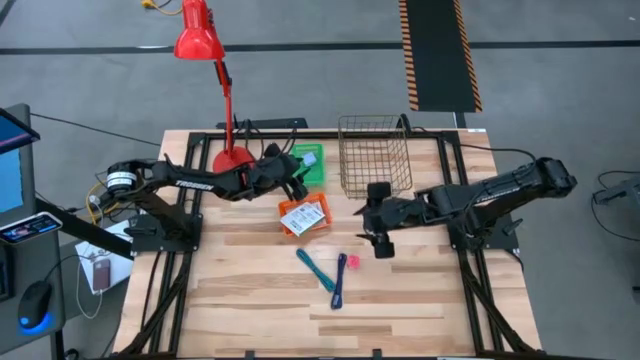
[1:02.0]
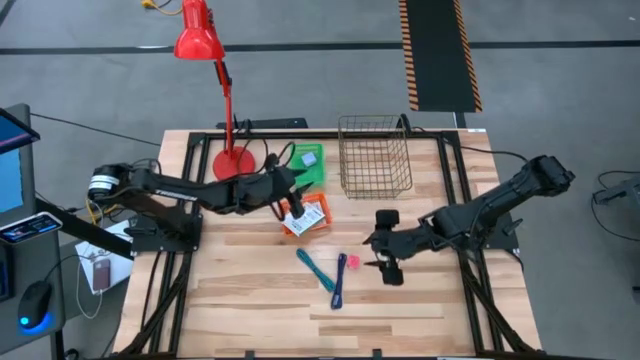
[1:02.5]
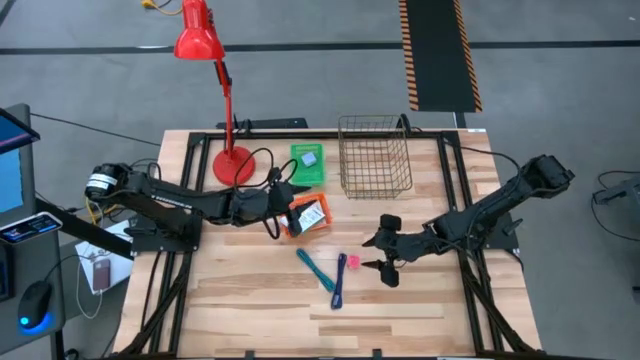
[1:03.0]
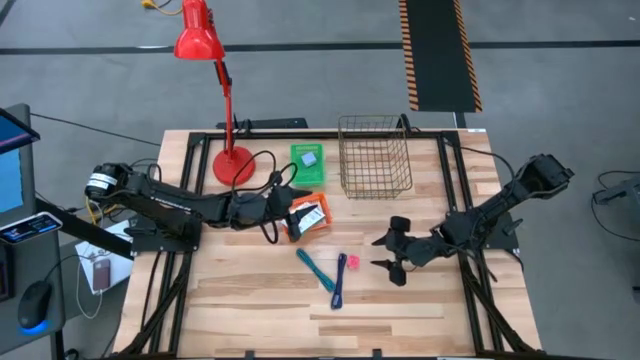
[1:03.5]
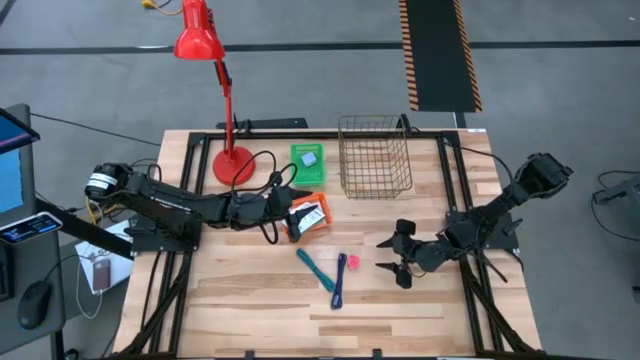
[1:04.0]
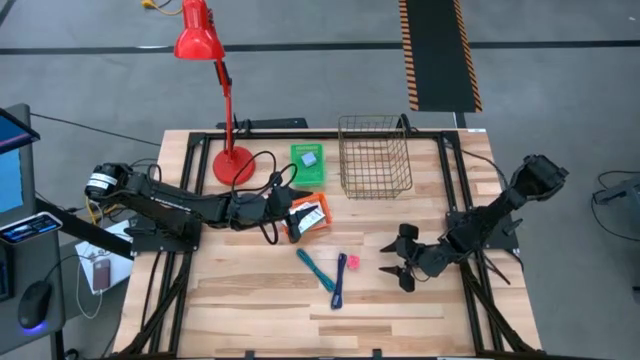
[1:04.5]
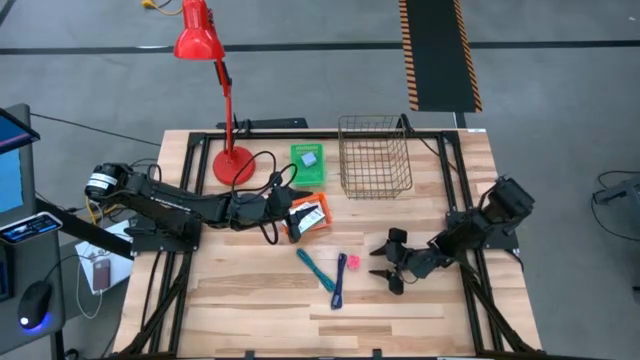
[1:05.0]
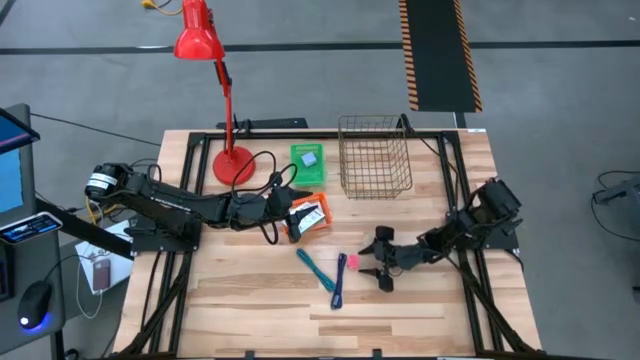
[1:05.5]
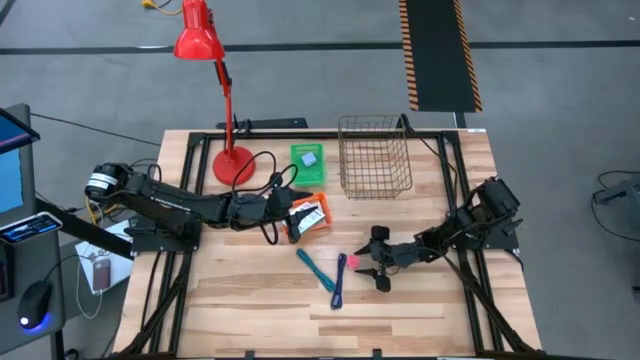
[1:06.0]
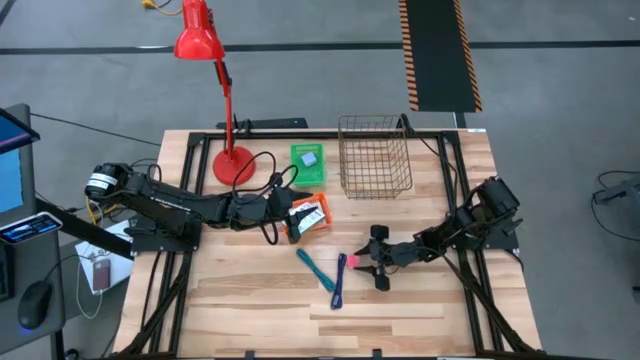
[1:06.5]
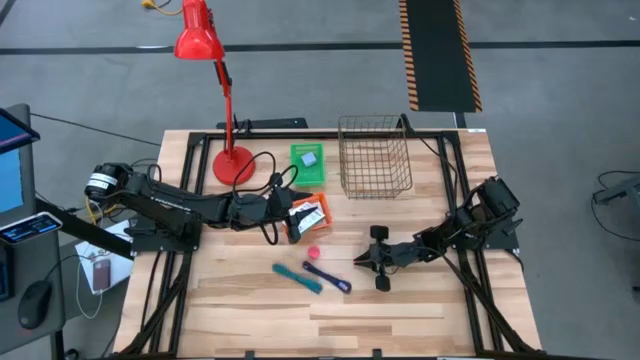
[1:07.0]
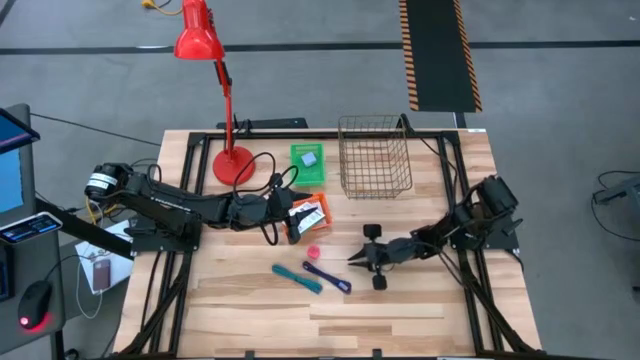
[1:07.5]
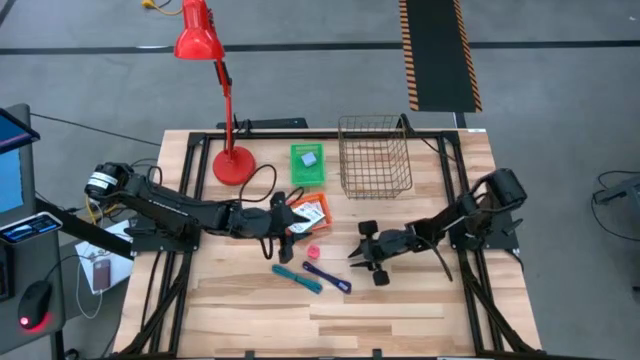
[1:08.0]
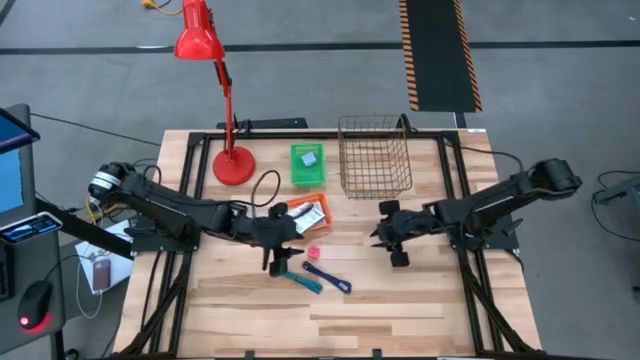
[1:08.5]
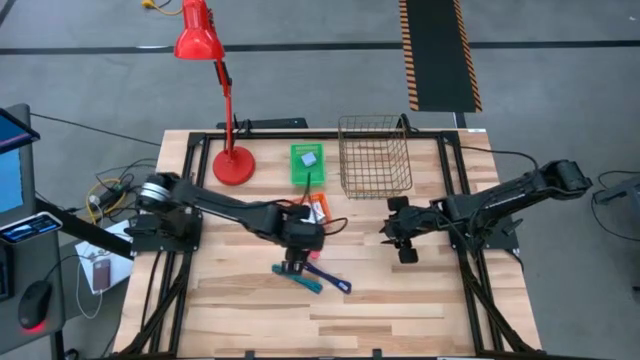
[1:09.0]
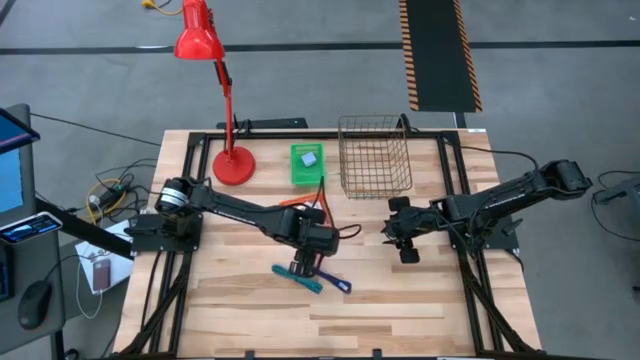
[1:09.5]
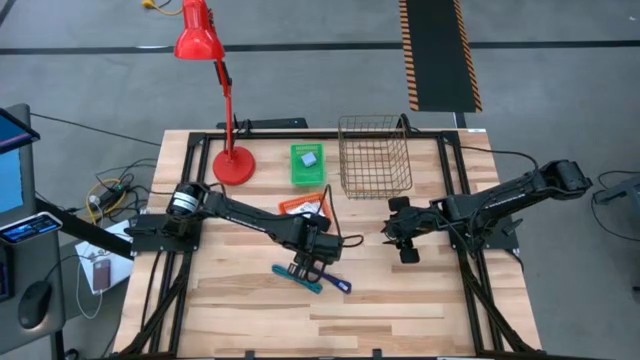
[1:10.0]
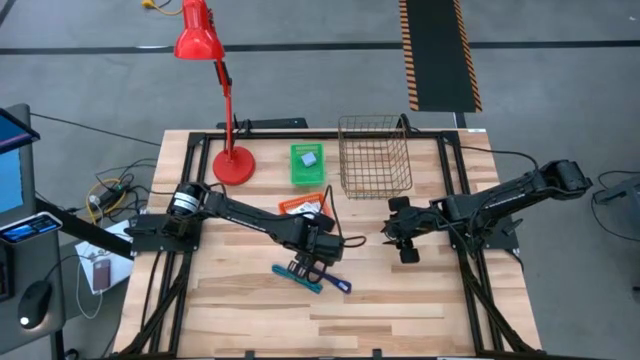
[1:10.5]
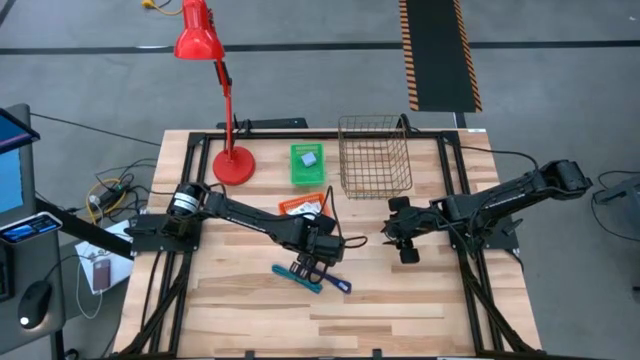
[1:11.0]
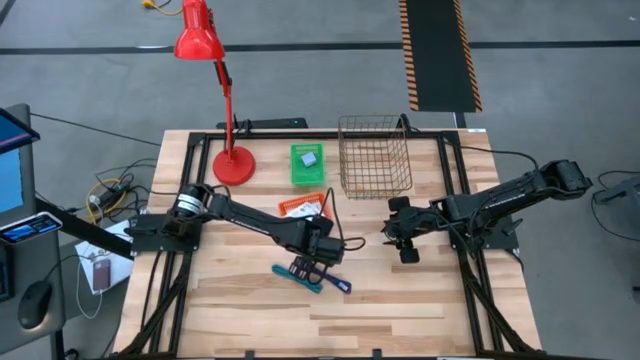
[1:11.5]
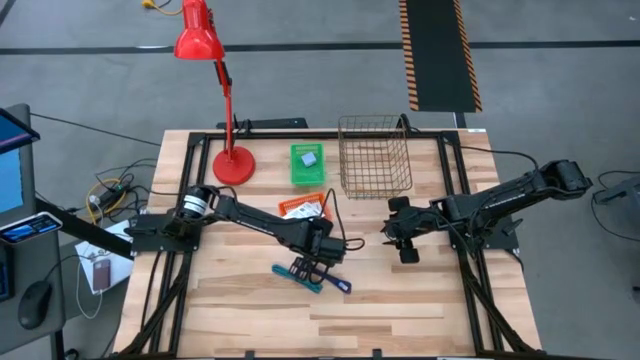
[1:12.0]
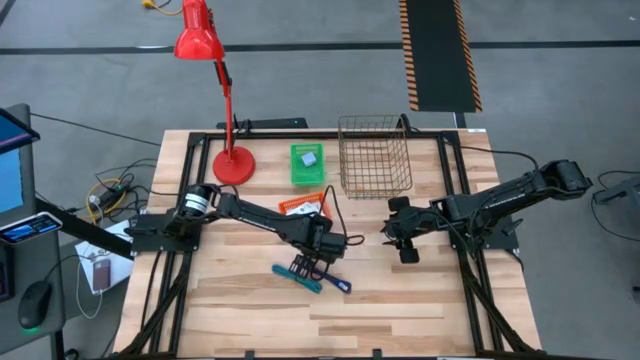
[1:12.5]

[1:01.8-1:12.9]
Task: Pick and place items into bin
Put the pink adapter into the green bin

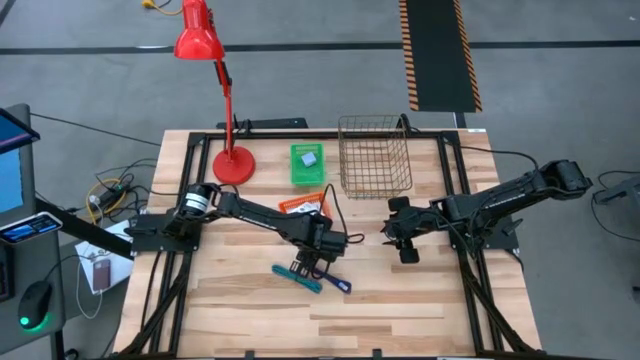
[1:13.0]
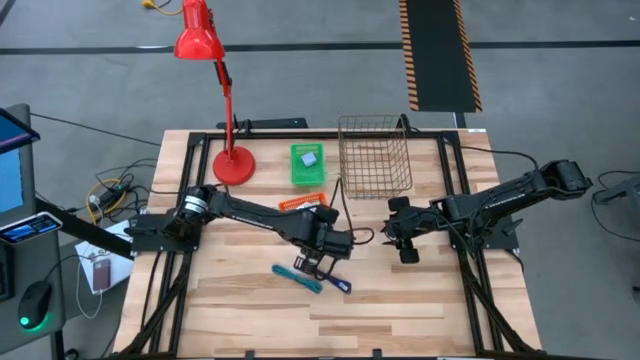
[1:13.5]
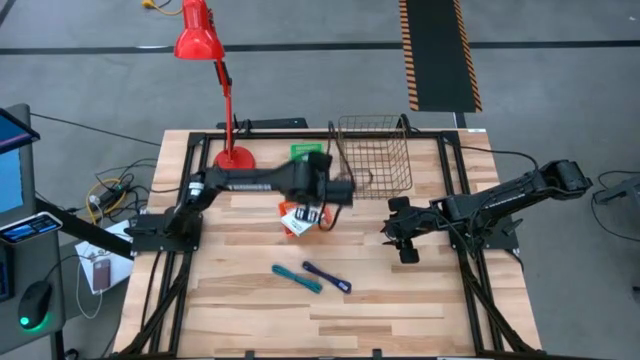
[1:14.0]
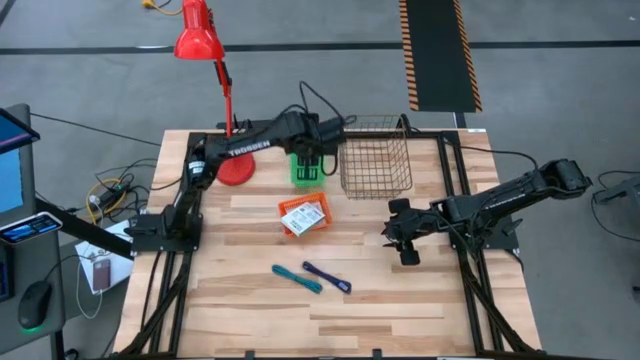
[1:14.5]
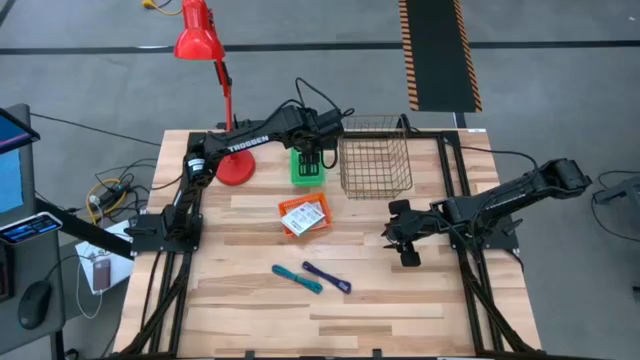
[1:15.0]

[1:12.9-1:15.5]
Put the pink adapter into the green bin

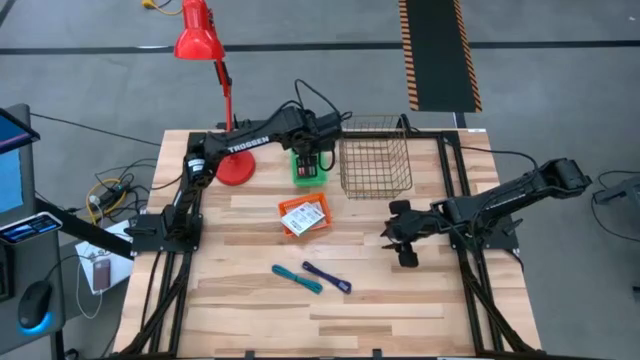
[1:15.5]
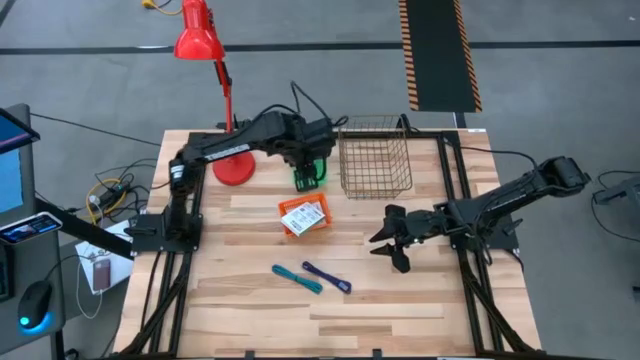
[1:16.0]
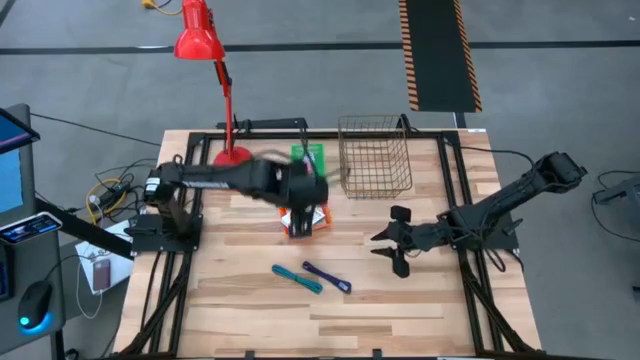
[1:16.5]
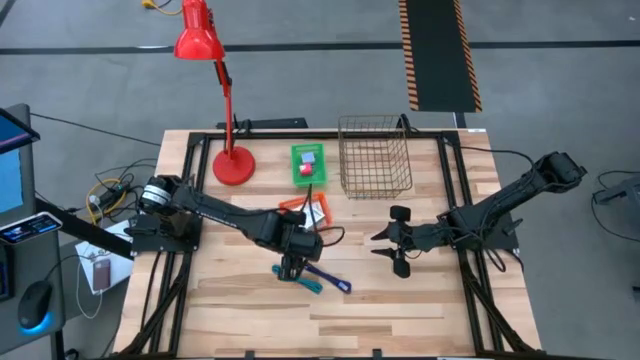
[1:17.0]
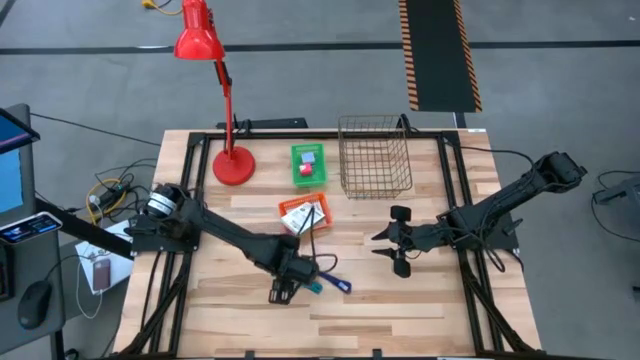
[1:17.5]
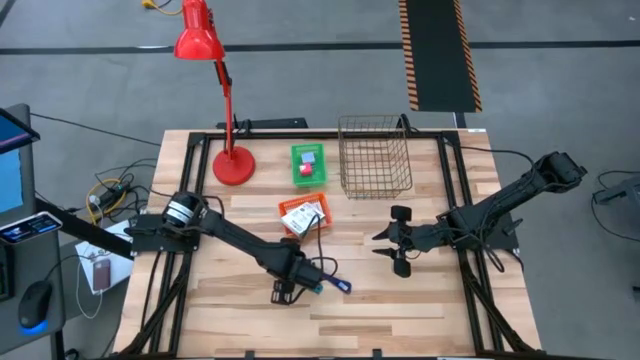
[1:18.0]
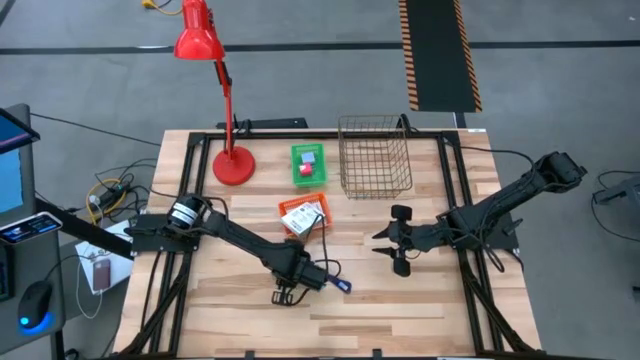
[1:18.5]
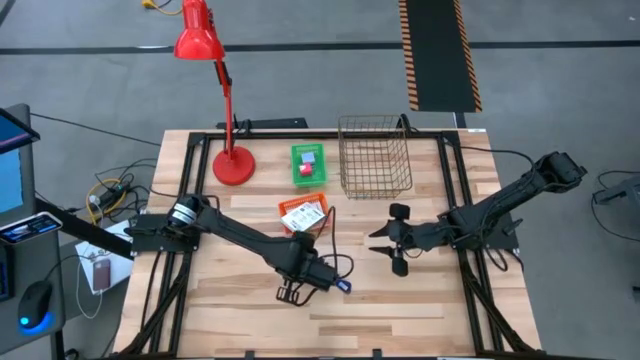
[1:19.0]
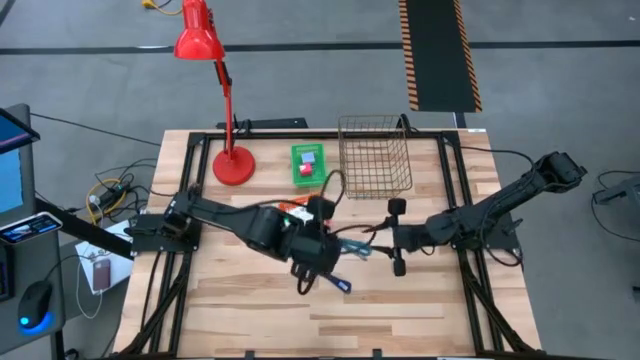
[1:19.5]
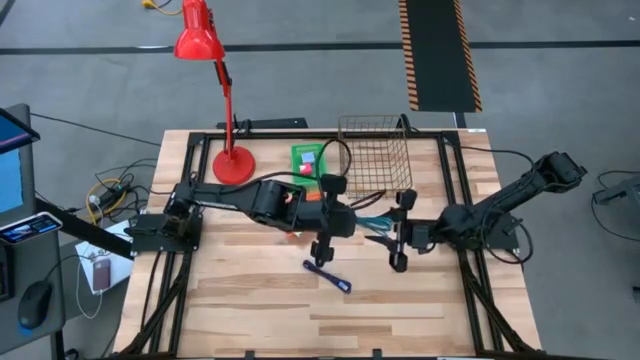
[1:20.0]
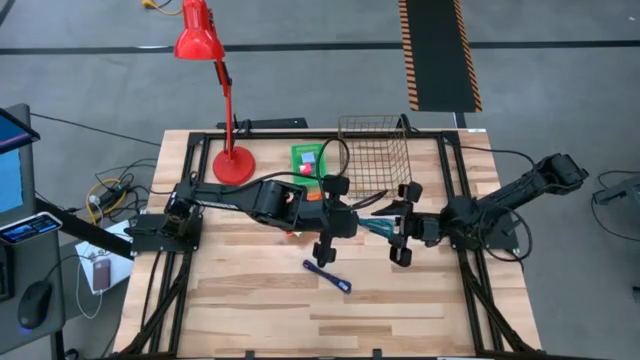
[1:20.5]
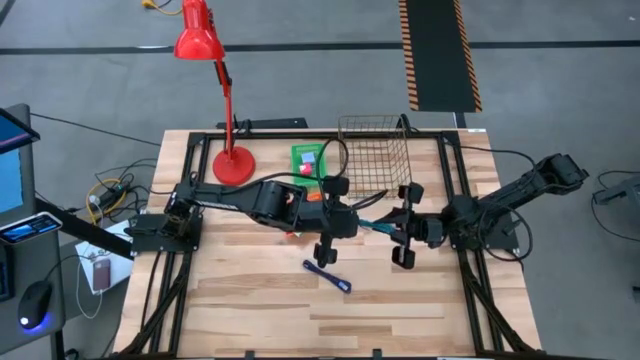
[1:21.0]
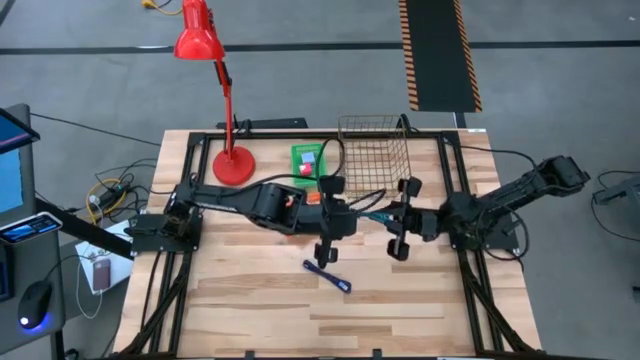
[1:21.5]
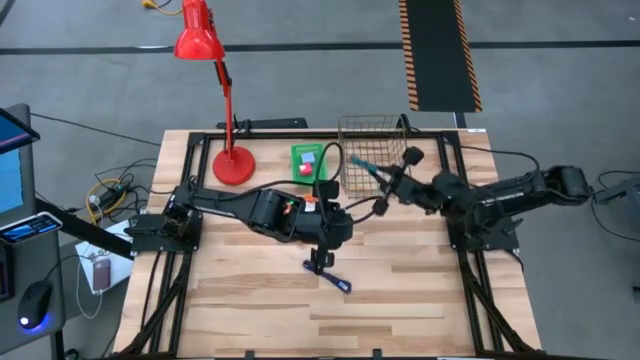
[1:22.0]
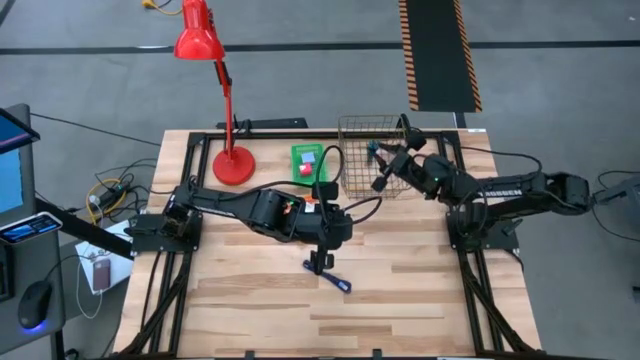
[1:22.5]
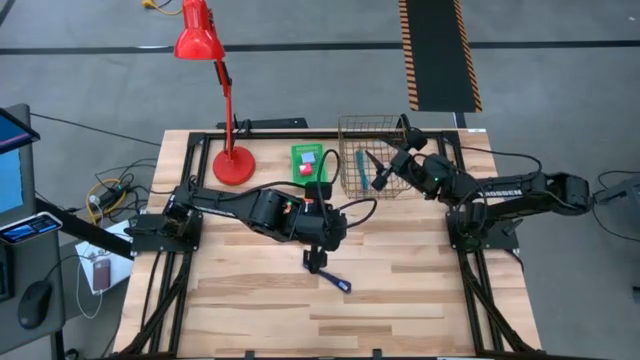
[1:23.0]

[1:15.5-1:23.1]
Put the light blue charger cable into the wire basket
